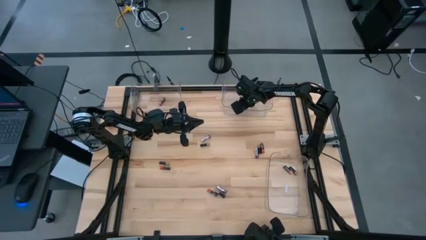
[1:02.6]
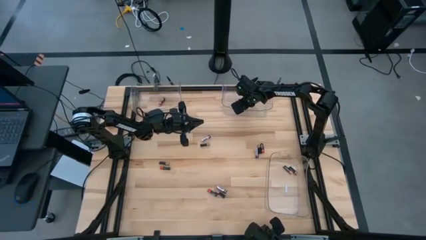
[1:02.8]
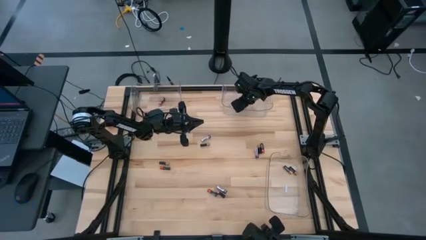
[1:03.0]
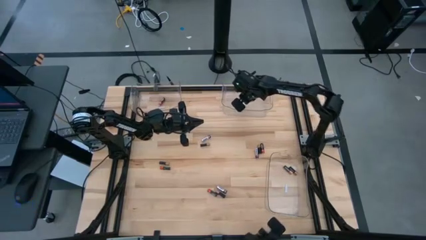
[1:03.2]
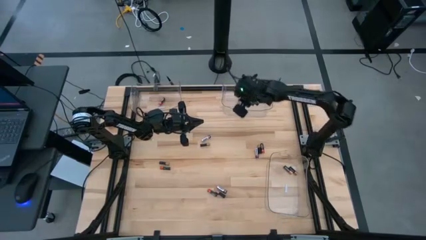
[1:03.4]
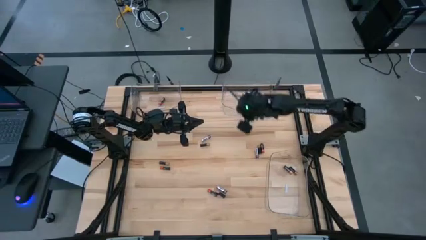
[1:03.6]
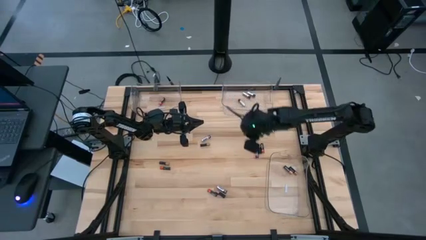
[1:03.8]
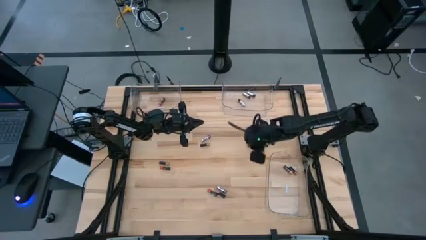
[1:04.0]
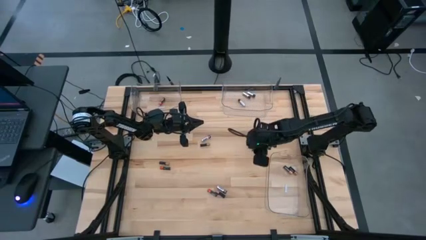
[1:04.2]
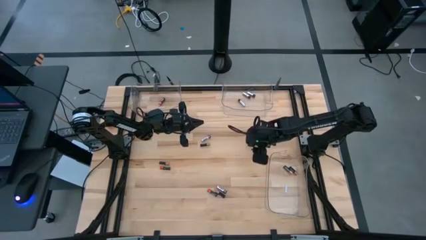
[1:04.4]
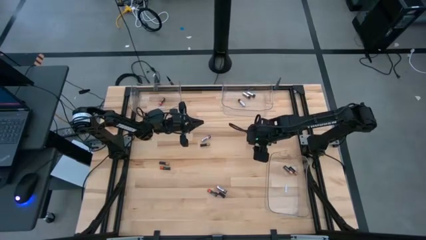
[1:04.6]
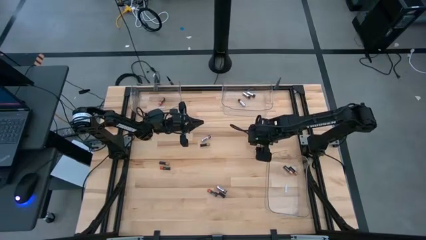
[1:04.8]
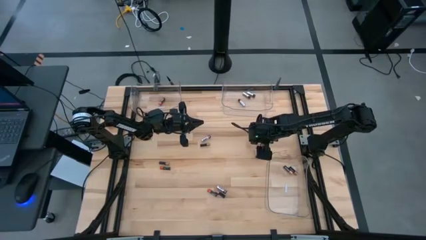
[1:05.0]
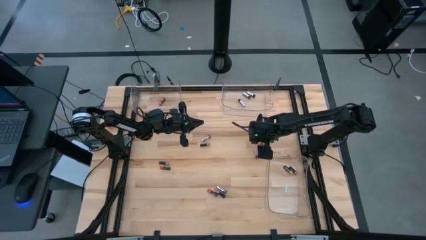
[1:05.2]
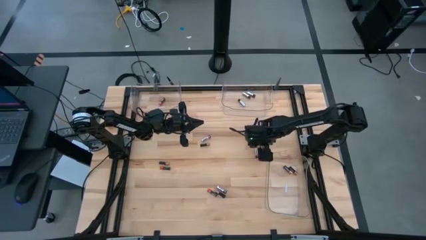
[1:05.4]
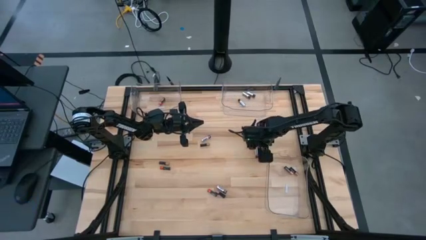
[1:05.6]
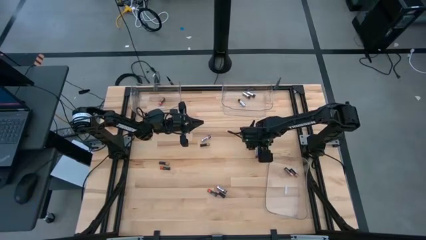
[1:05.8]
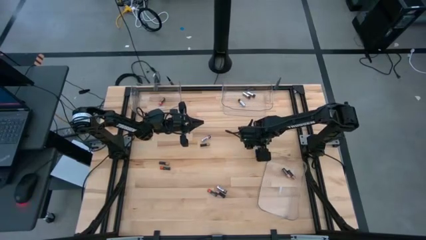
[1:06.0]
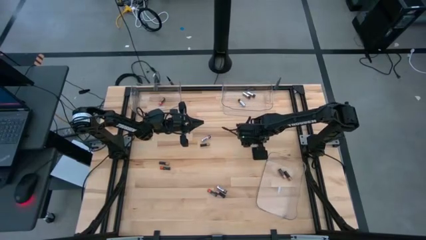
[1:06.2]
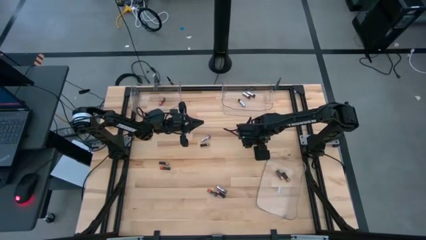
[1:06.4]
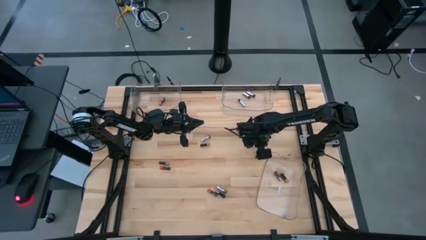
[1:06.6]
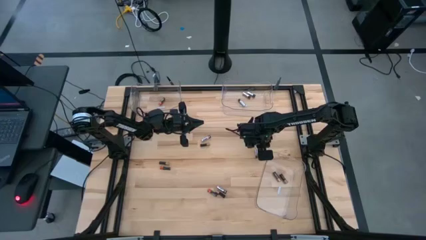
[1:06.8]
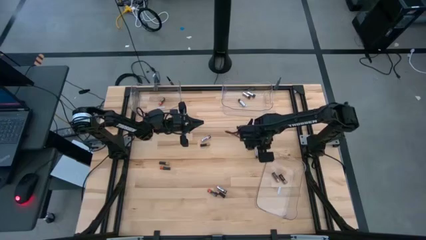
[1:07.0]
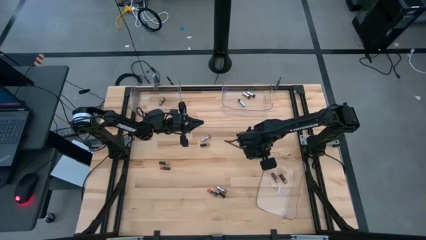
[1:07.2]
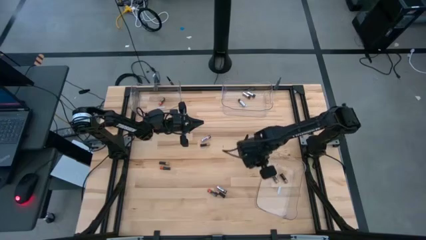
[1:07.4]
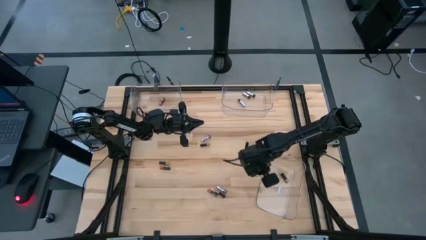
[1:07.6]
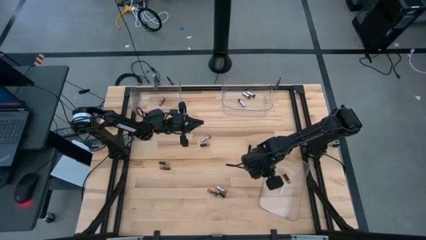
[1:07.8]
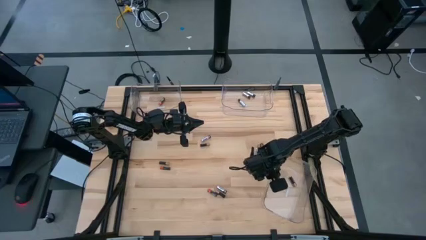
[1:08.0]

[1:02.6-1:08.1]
Task: Sort batteries
Adjust the bottom right transparent bin

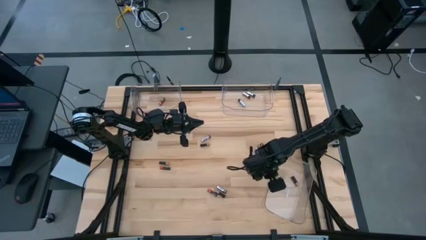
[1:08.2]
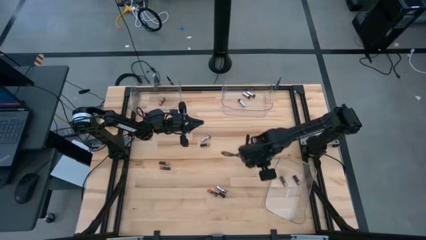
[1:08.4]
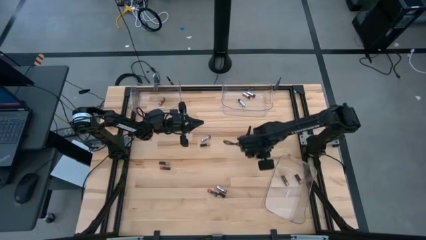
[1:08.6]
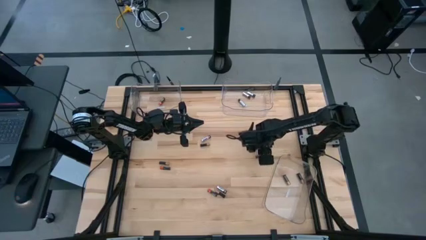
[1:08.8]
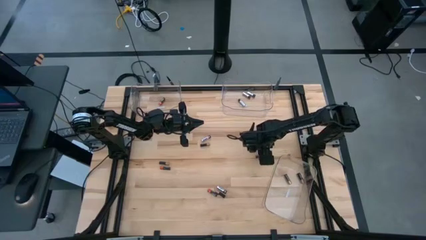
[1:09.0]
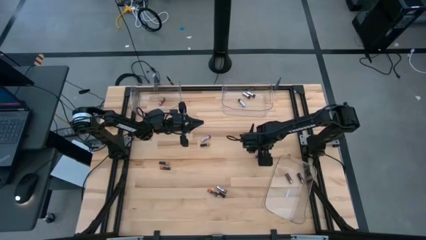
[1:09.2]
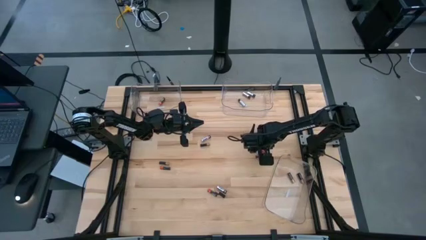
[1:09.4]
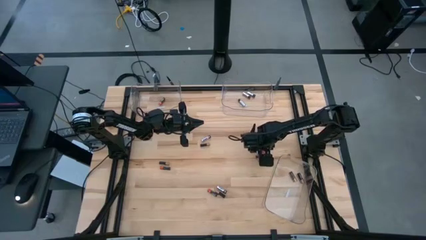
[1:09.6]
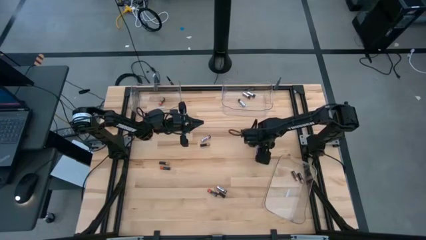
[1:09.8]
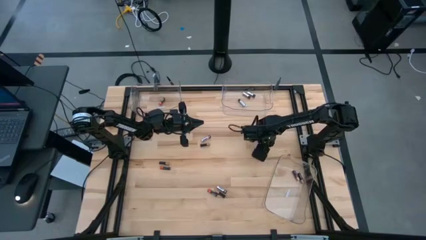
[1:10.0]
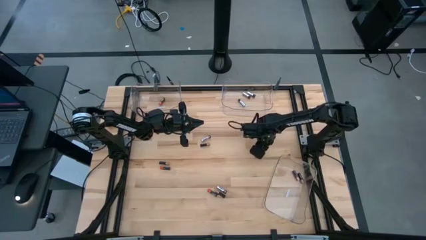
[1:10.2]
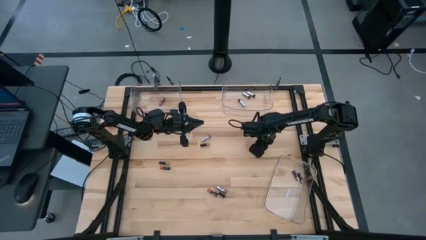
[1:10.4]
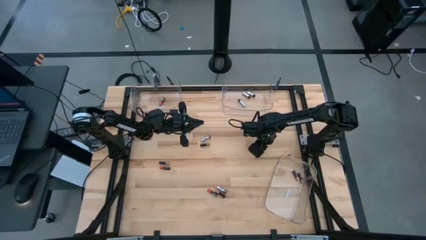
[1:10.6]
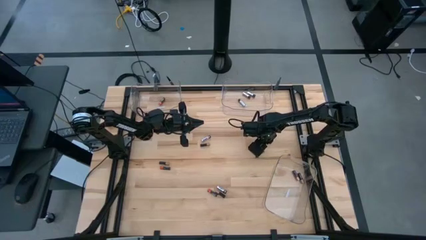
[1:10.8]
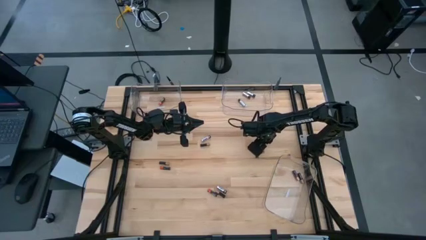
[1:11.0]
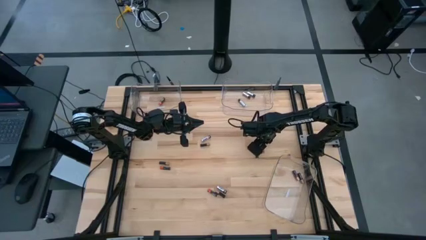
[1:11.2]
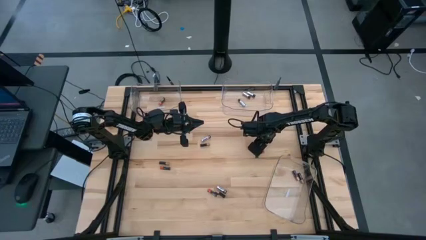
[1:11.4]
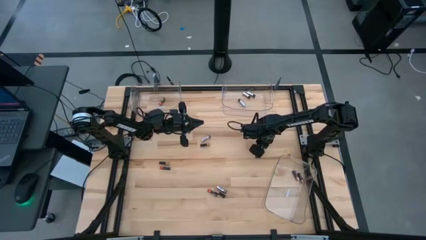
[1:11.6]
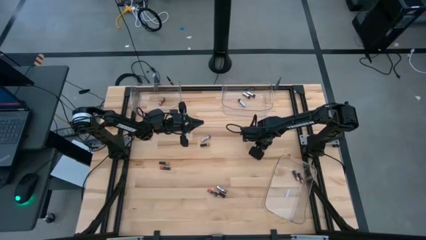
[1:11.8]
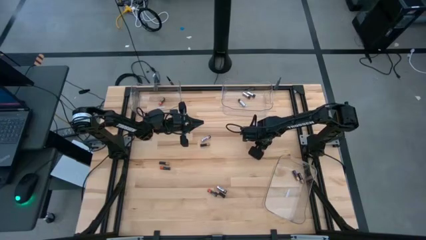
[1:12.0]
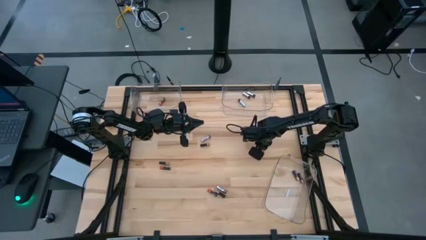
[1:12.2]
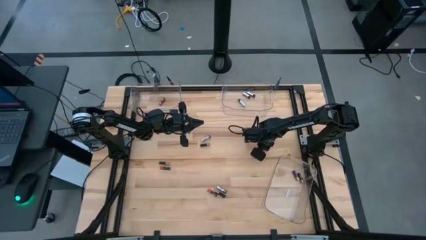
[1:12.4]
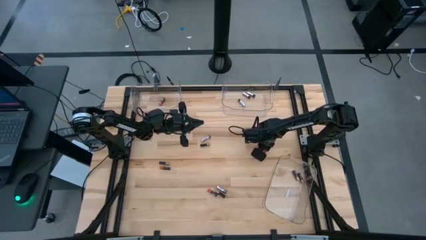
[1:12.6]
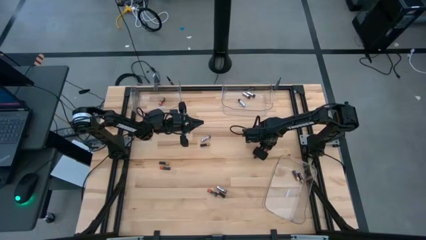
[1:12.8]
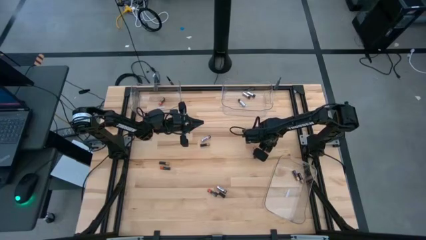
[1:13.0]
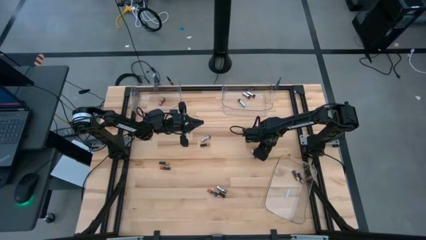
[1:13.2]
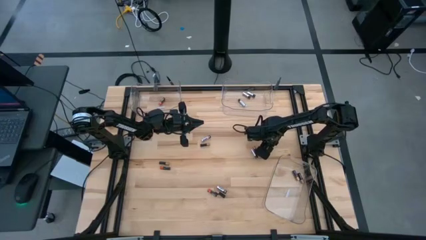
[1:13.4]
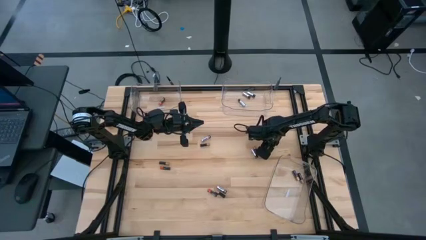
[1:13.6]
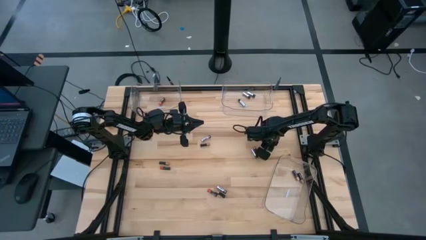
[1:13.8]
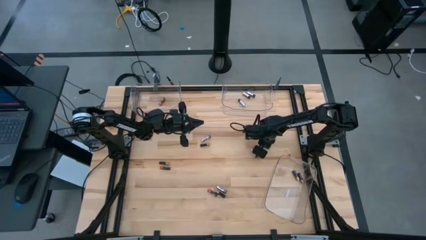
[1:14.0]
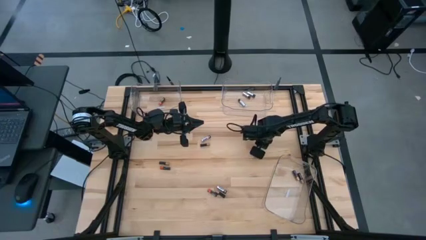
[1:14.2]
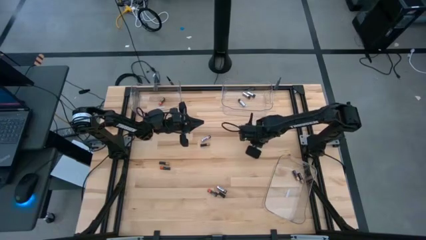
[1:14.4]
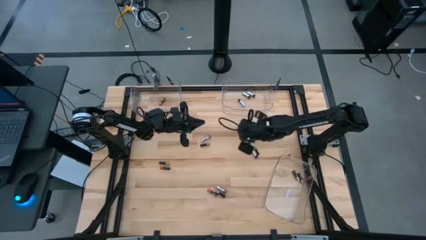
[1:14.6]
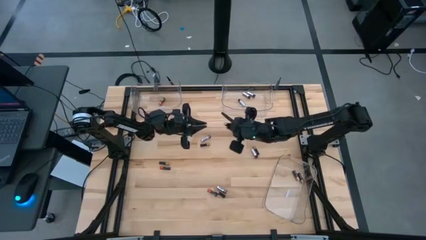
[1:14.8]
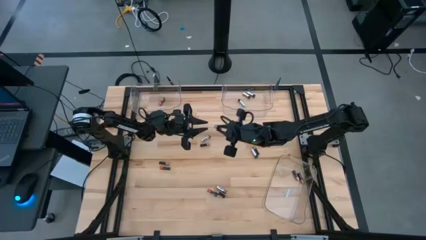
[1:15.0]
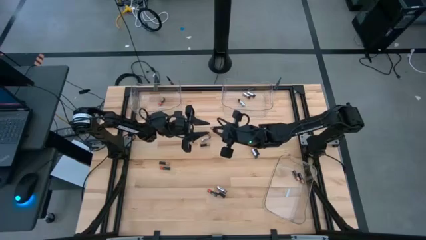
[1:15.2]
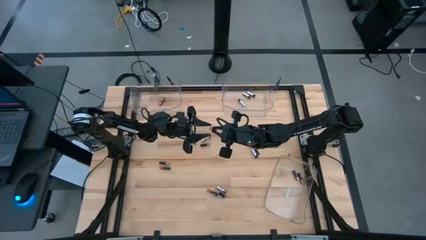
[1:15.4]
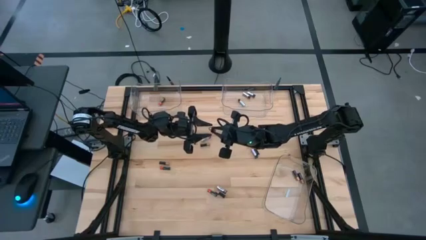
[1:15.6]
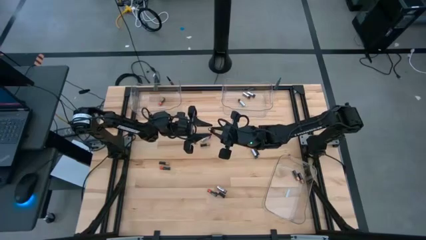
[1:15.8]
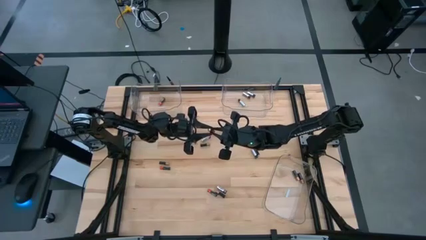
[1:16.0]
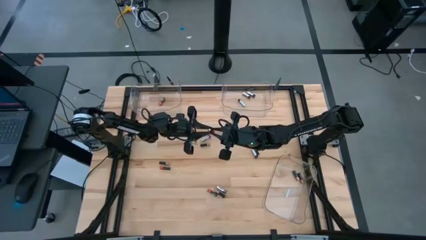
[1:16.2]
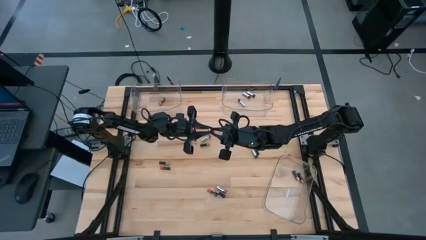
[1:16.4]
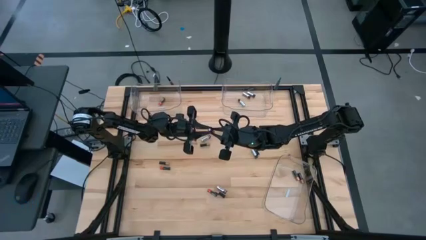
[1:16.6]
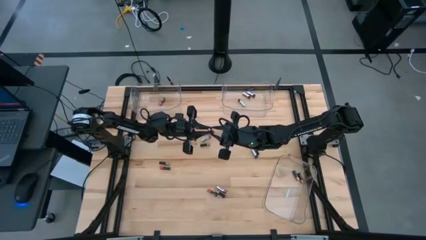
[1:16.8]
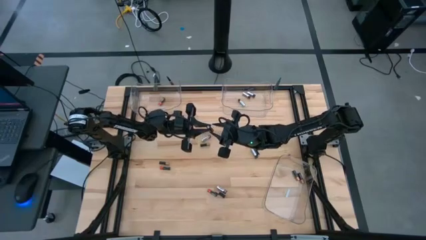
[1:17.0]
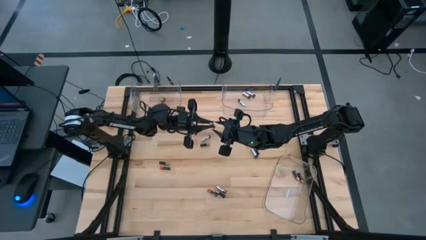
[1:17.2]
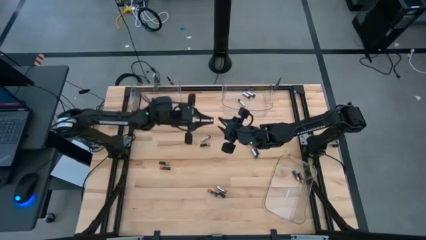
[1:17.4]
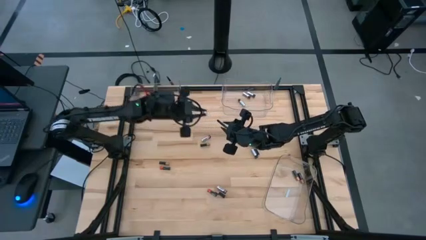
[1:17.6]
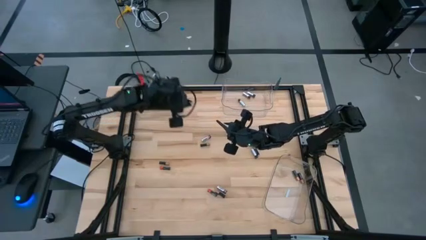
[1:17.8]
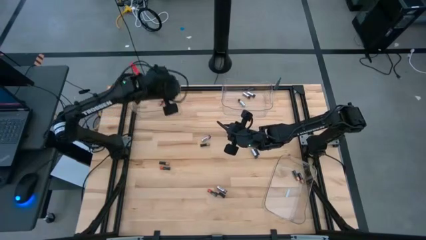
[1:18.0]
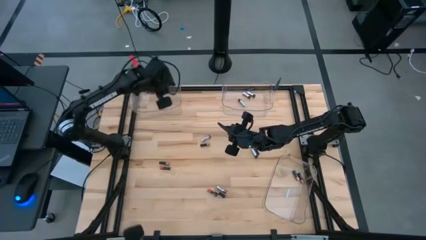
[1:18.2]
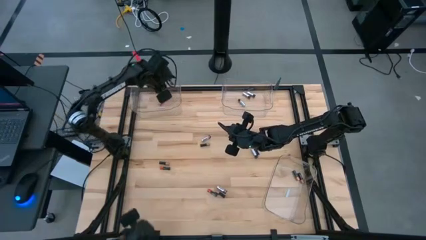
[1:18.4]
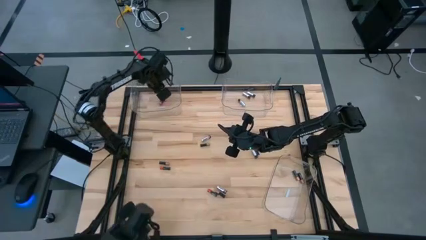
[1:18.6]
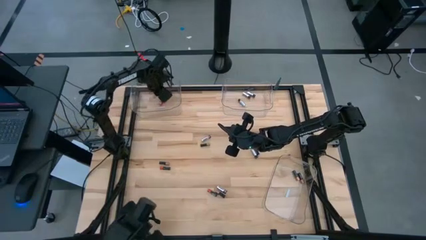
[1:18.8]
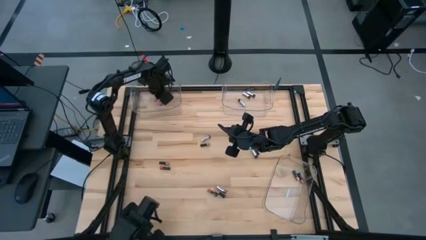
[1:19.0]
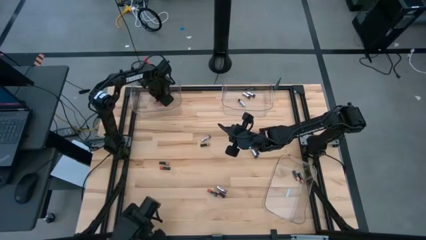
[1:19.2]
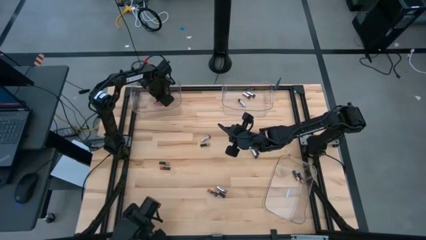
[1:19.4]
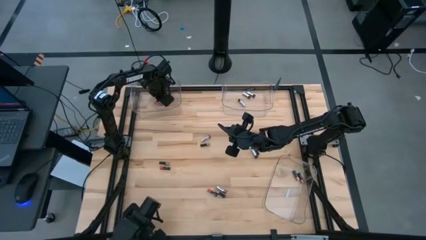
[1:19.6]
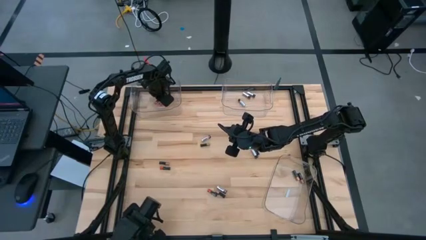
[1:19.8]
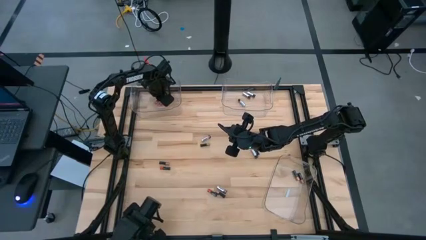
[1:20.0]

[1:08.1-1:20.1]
Put the black battery into the top left transparent bin
